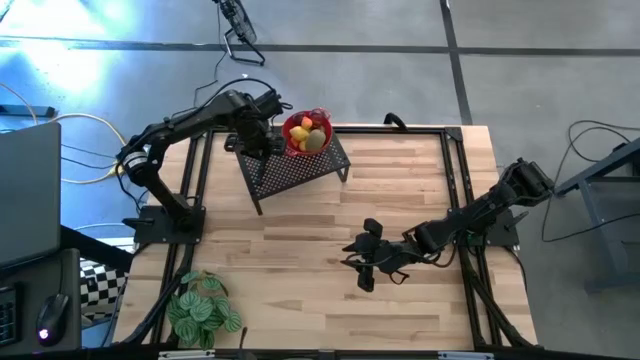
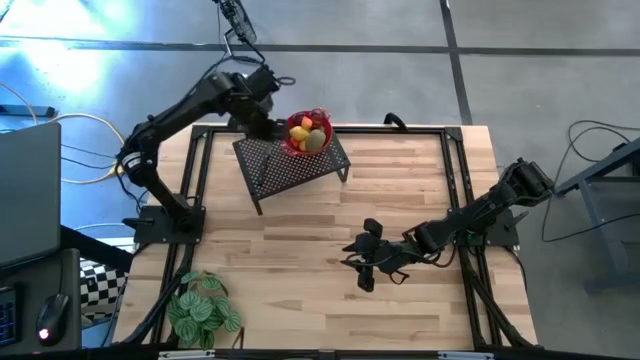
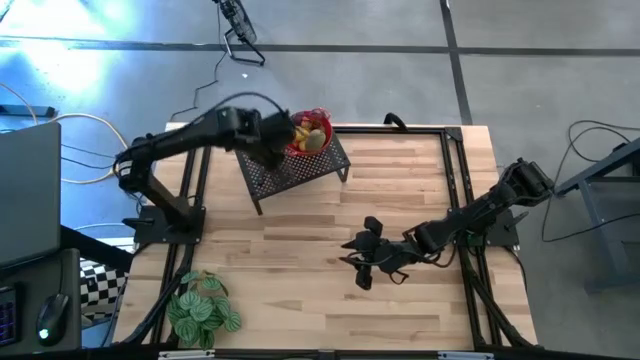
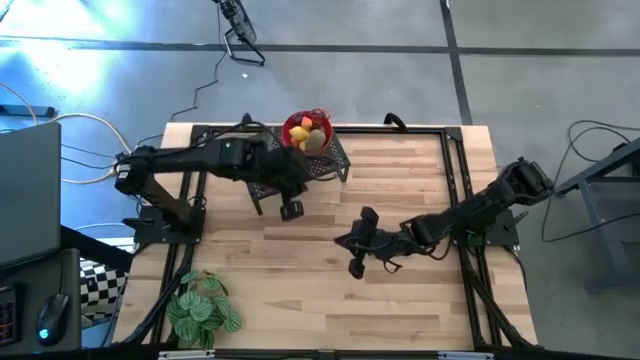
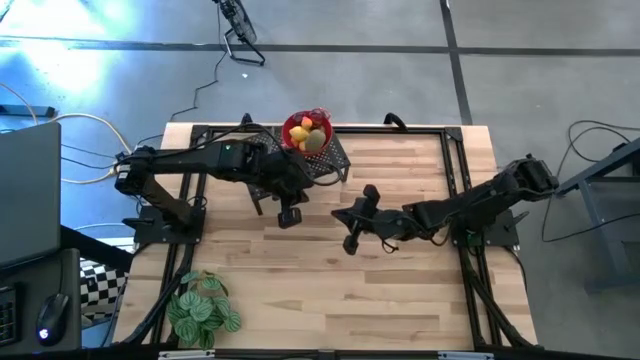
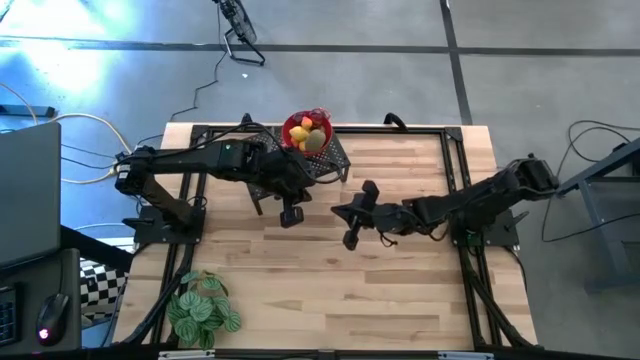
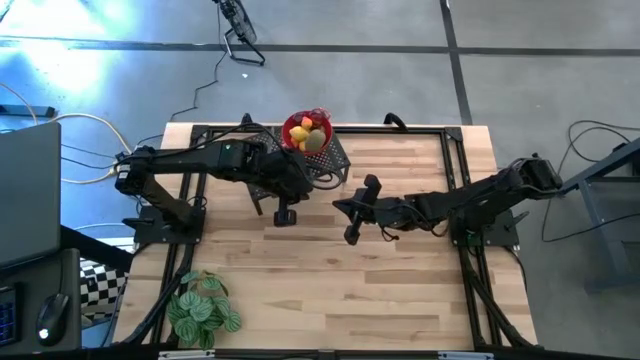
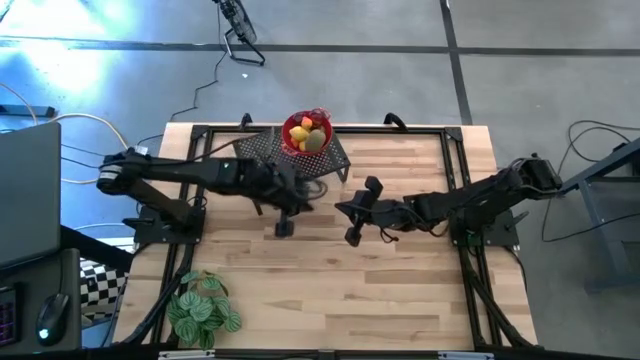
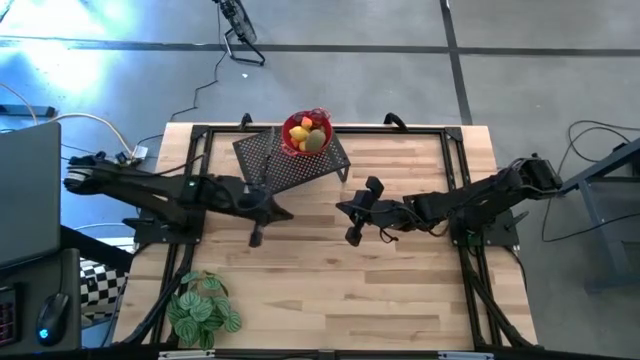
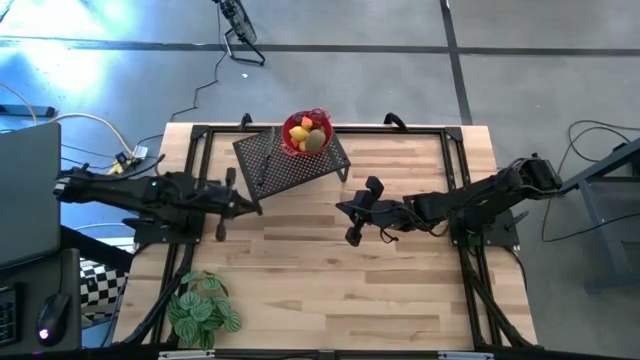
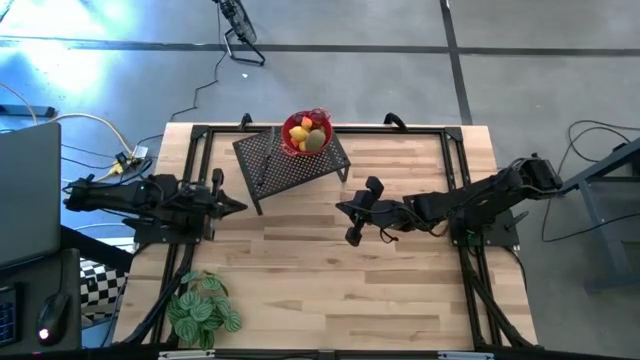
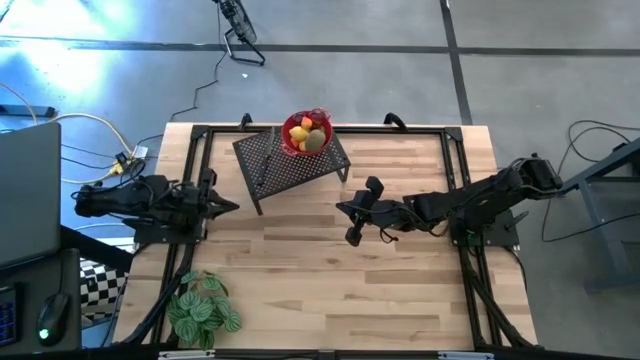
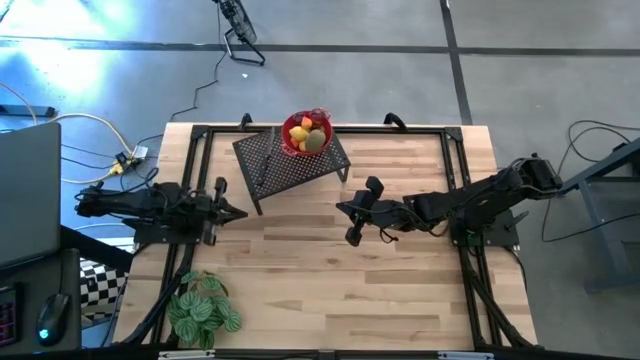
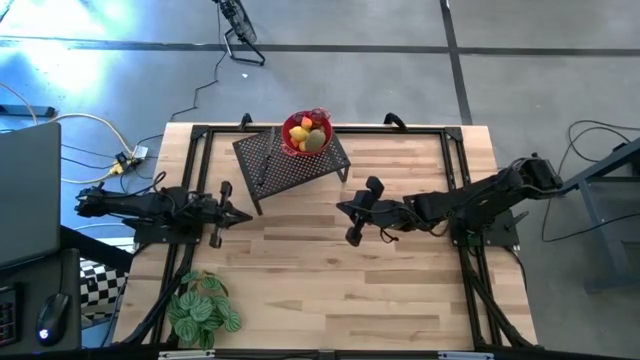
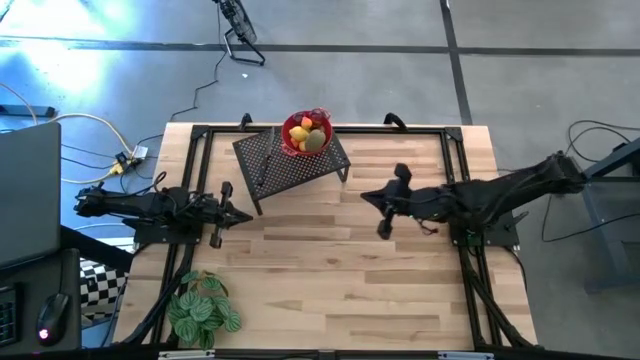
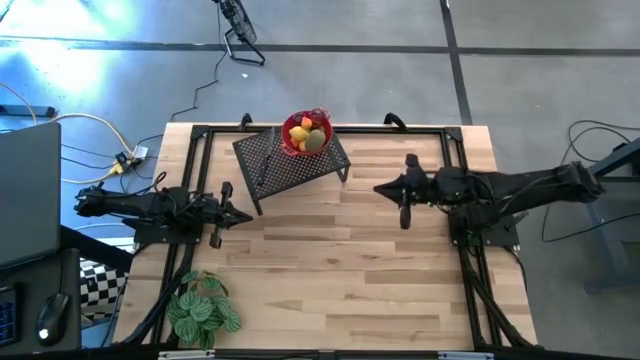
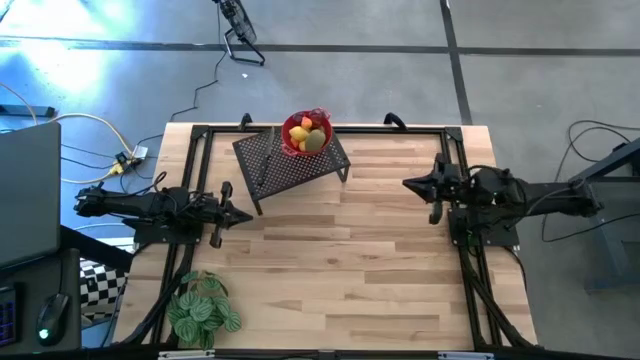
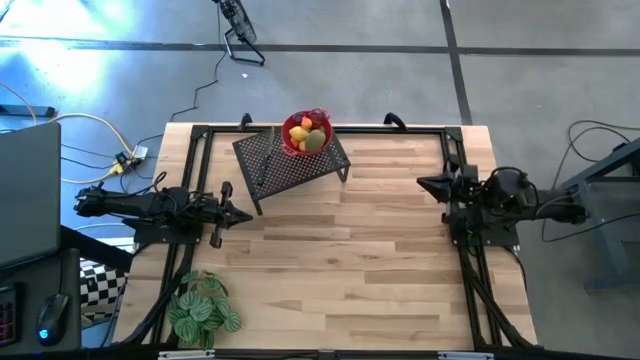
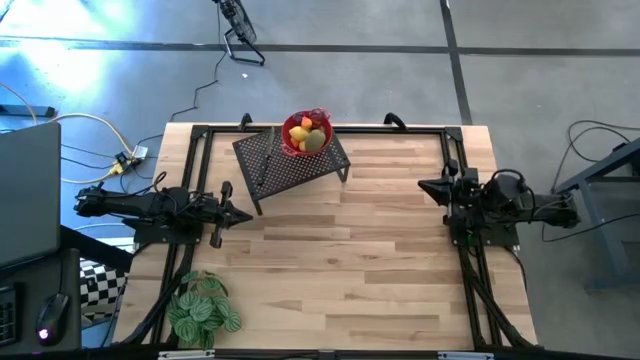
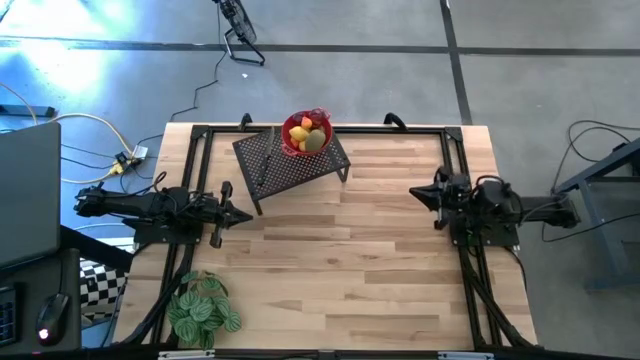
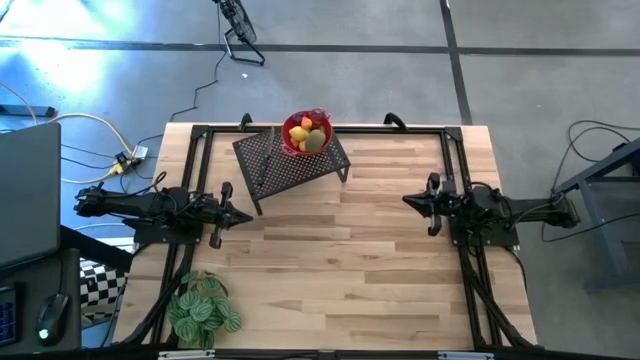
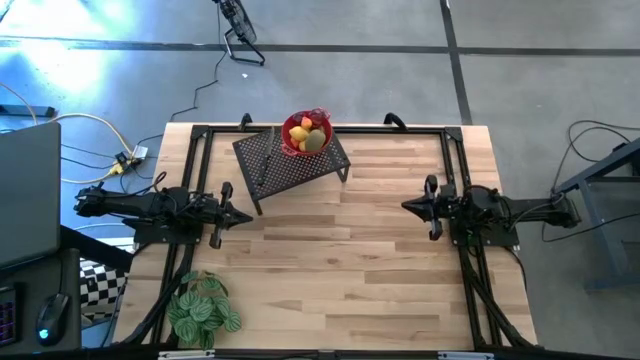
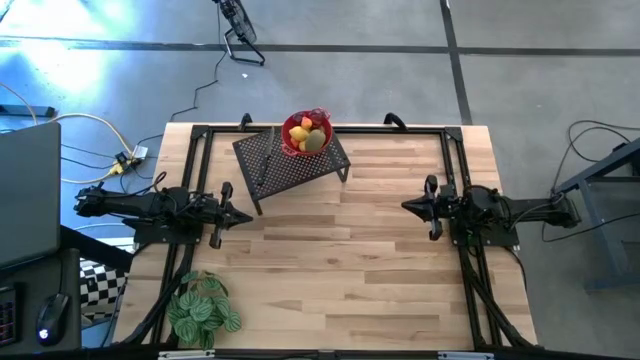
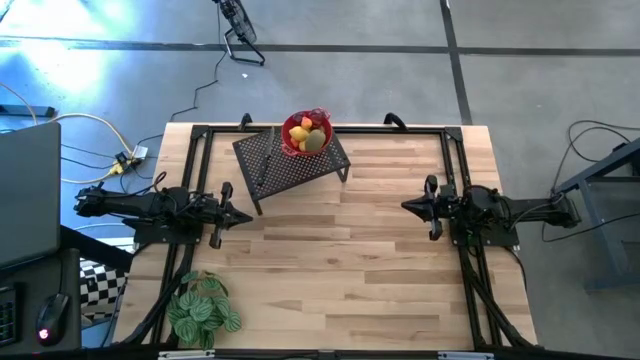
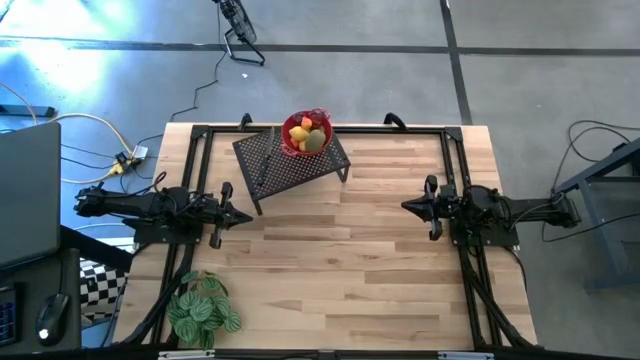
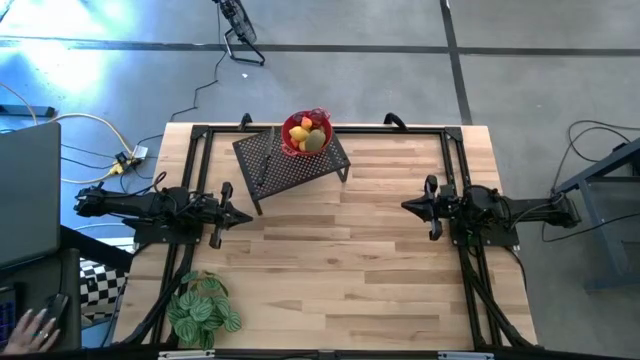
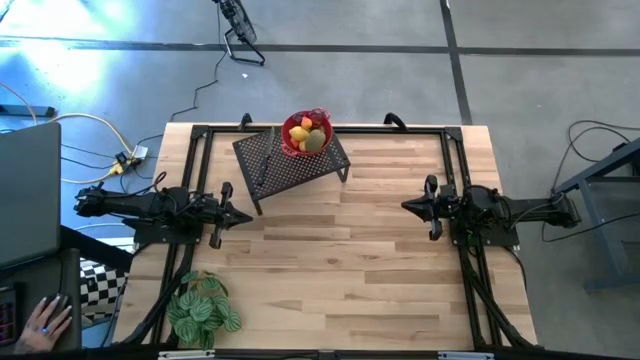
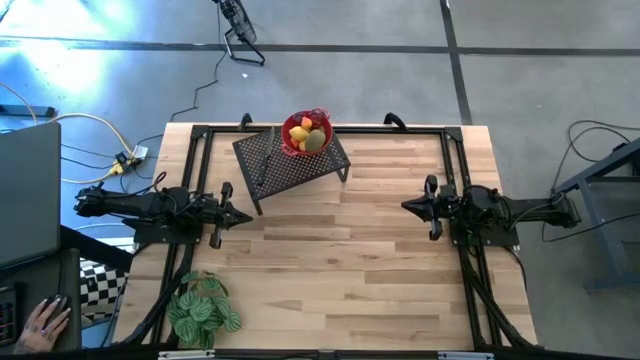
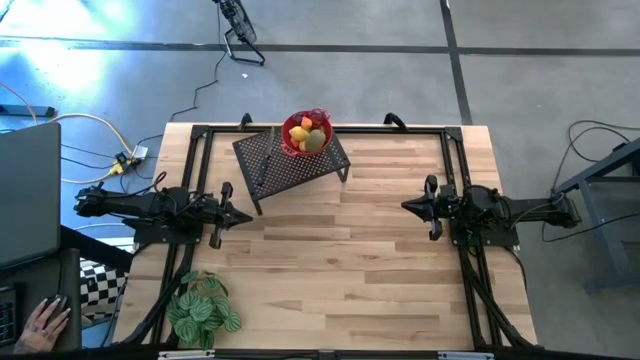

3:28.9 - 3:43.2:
Task: Pick & Place Fruit
Return to Home Position

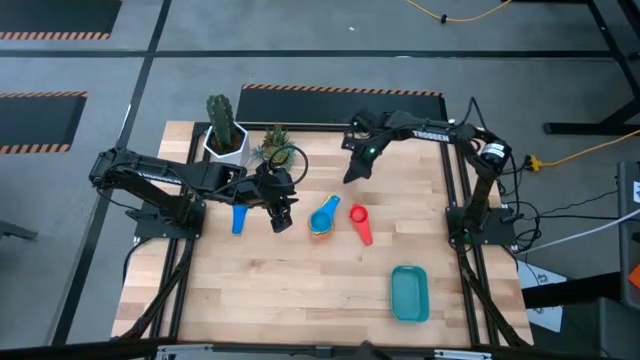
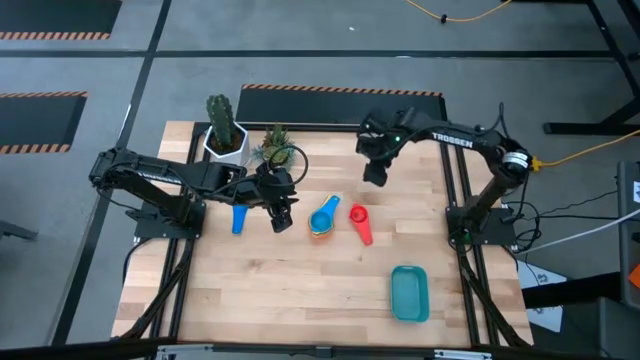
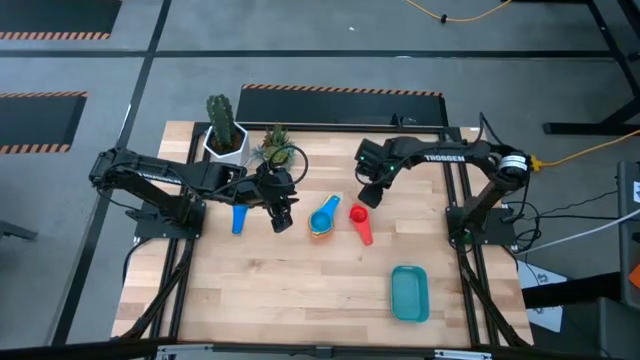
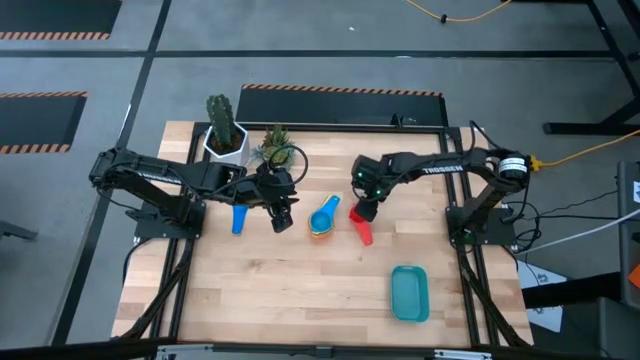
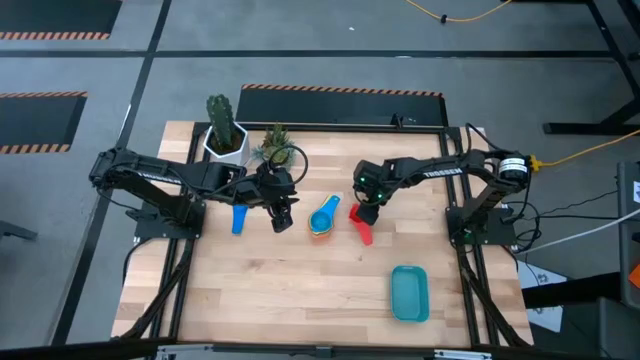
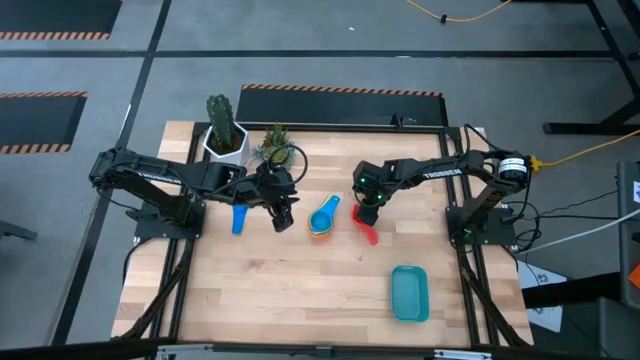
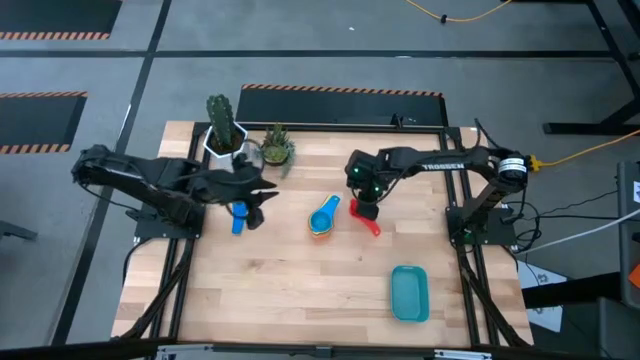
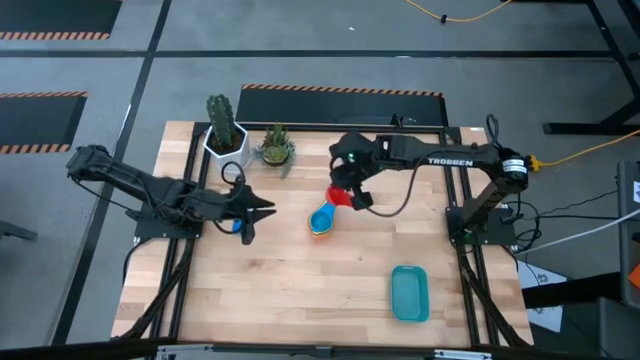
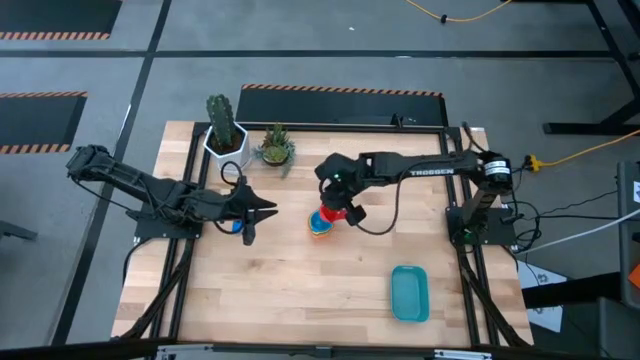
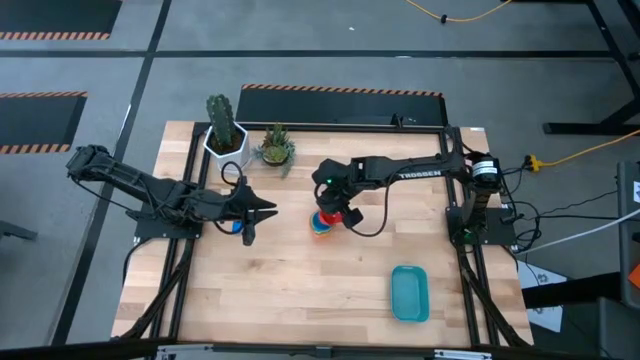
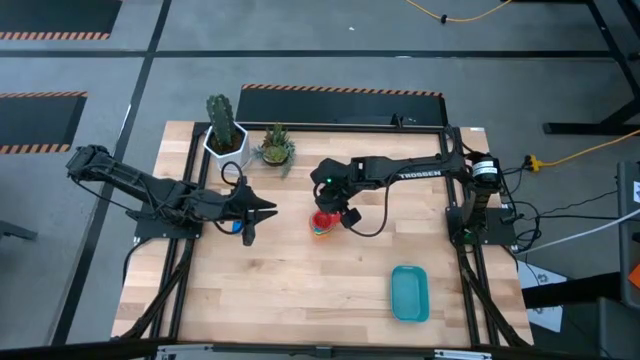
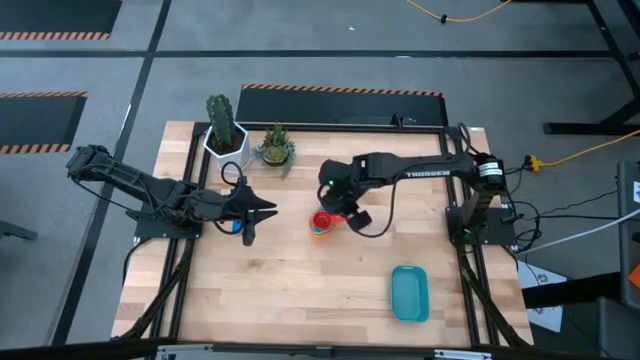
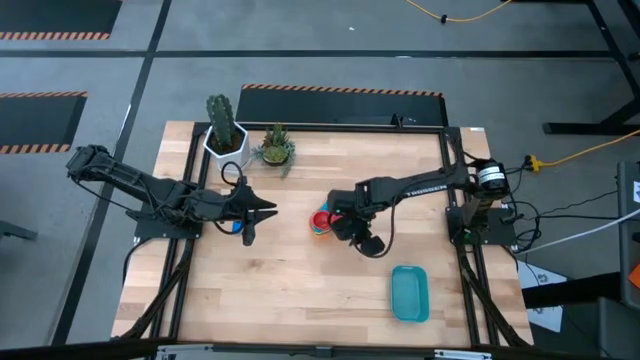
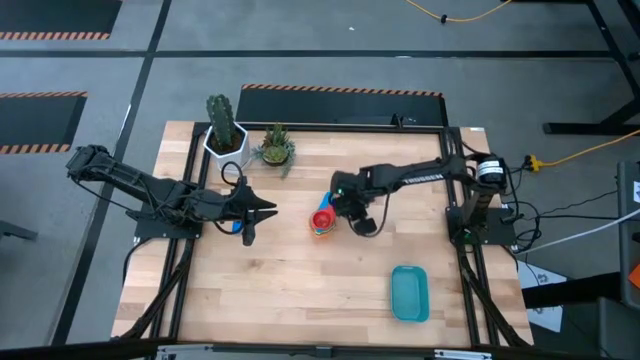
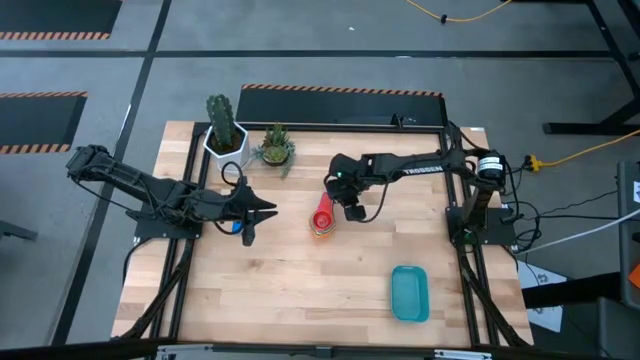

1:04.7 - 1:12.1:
Task: Nest measuring cups in basket
Stack the red measuring cup on top of the sky blue measuring cup
